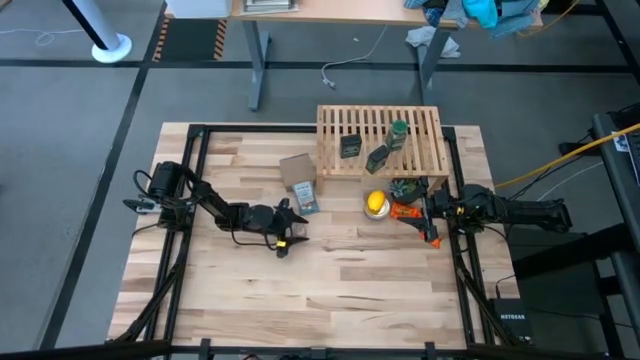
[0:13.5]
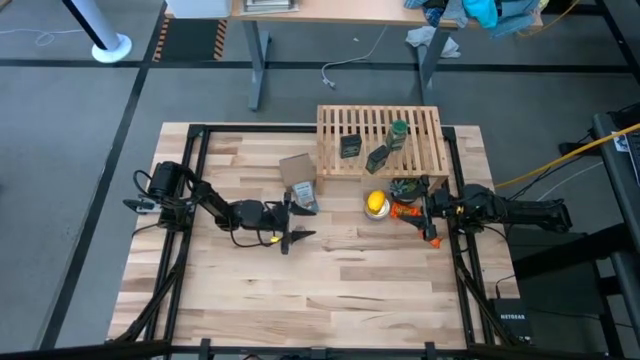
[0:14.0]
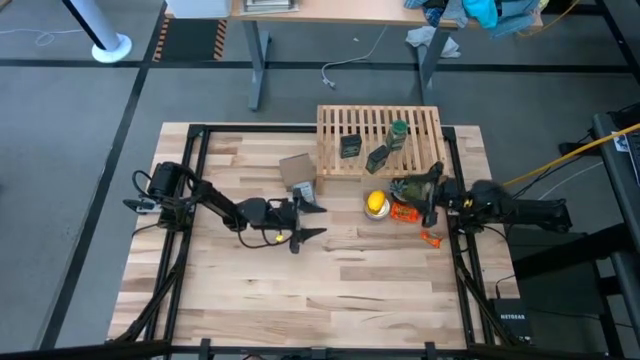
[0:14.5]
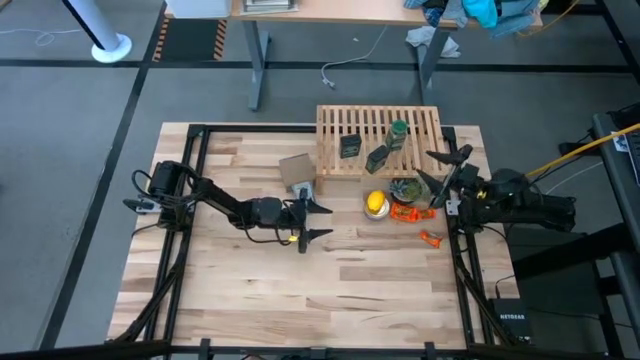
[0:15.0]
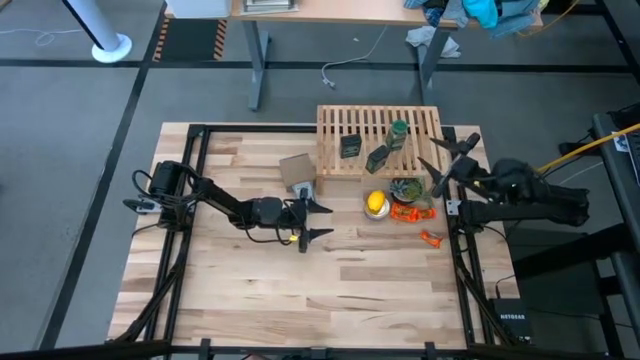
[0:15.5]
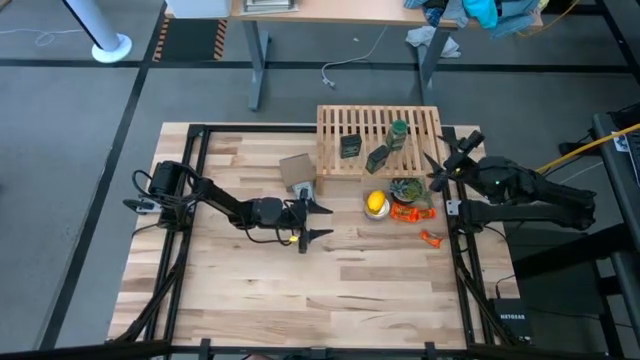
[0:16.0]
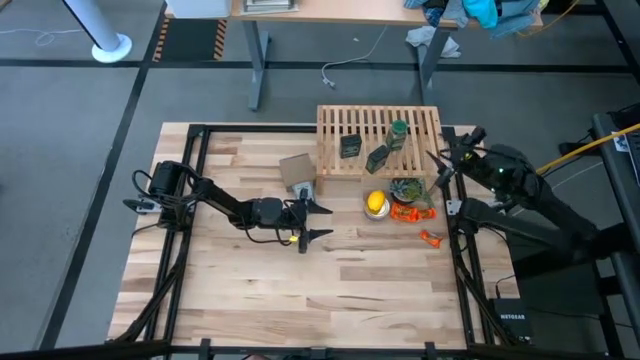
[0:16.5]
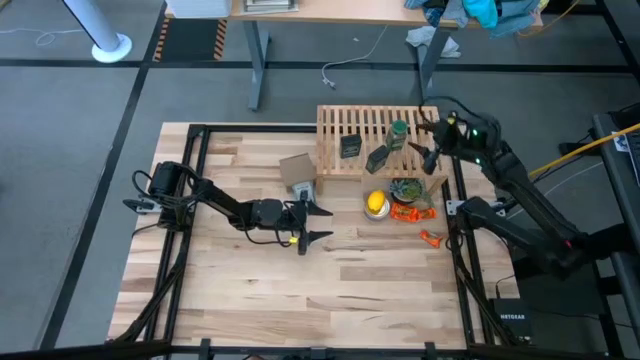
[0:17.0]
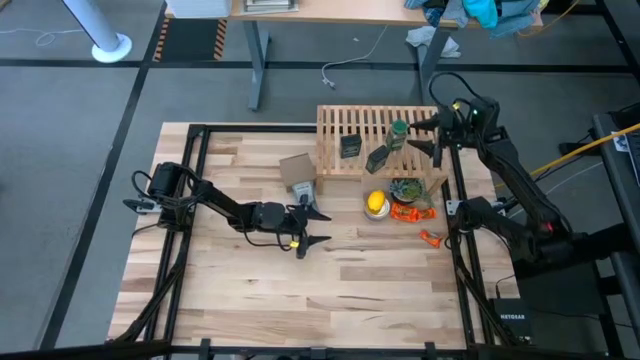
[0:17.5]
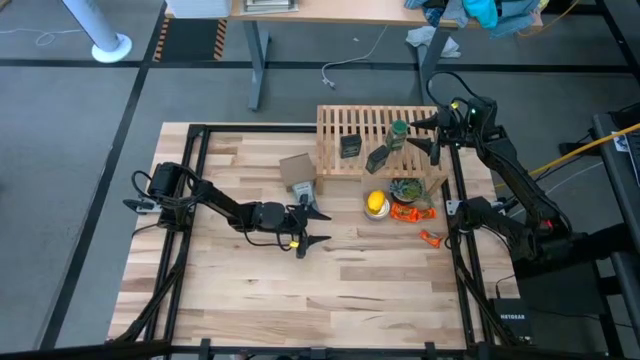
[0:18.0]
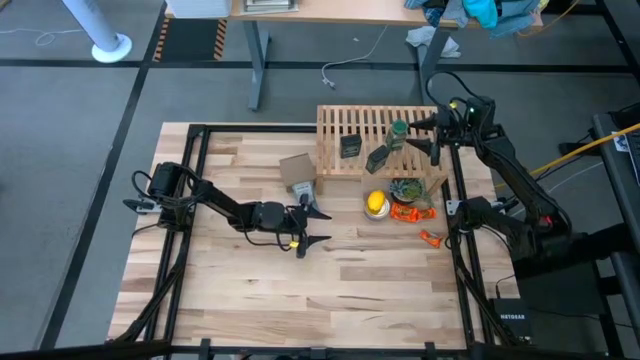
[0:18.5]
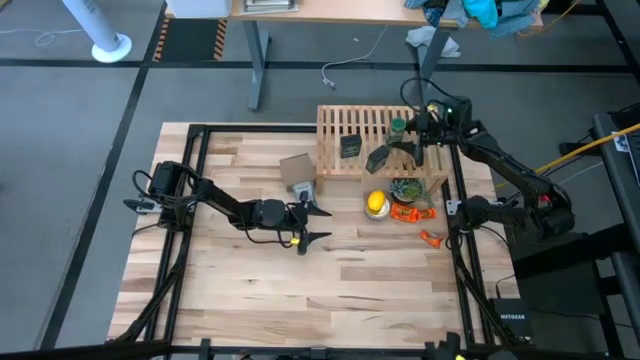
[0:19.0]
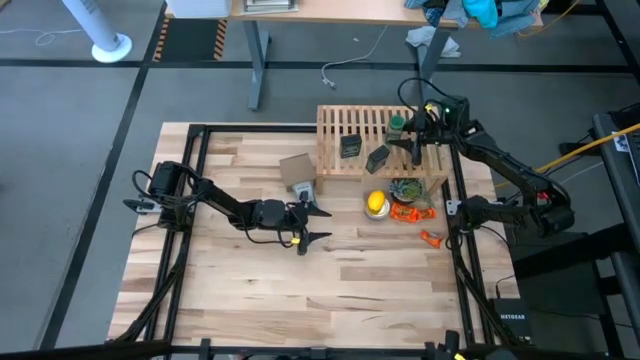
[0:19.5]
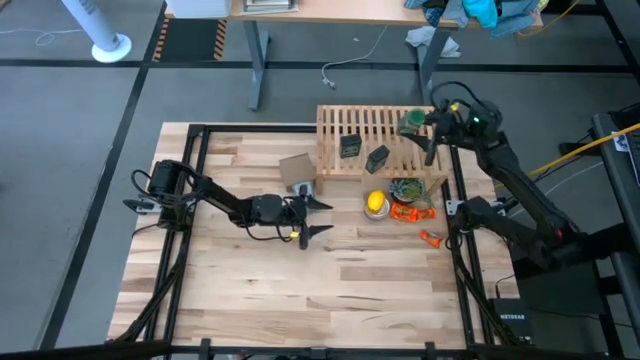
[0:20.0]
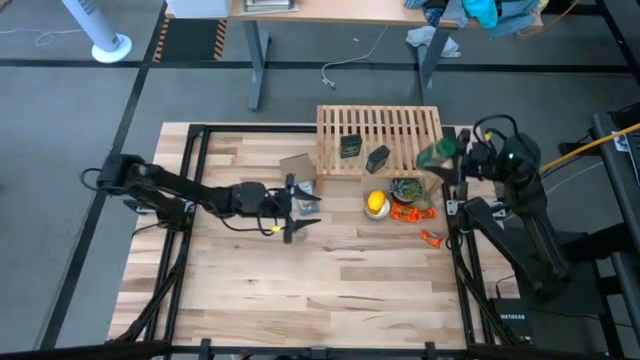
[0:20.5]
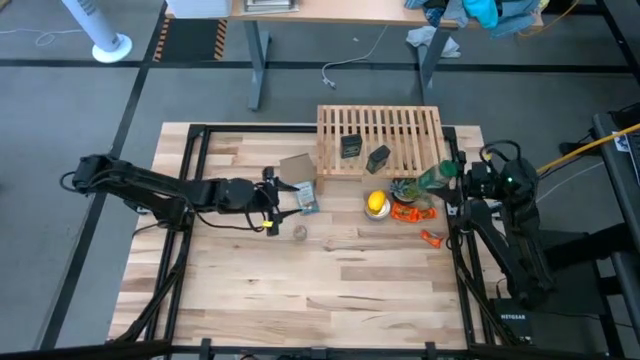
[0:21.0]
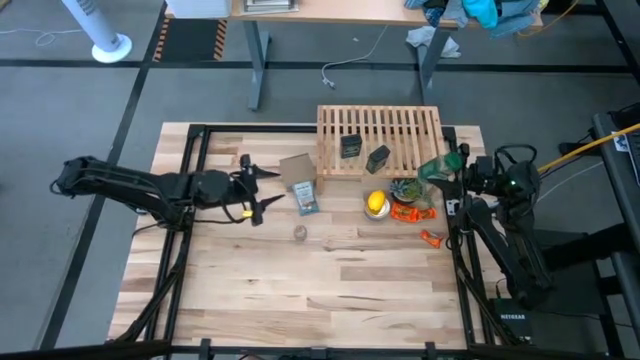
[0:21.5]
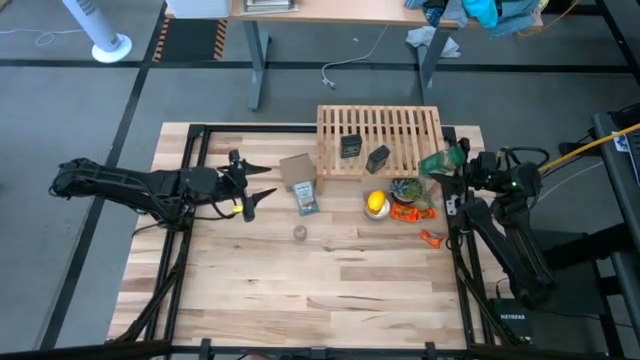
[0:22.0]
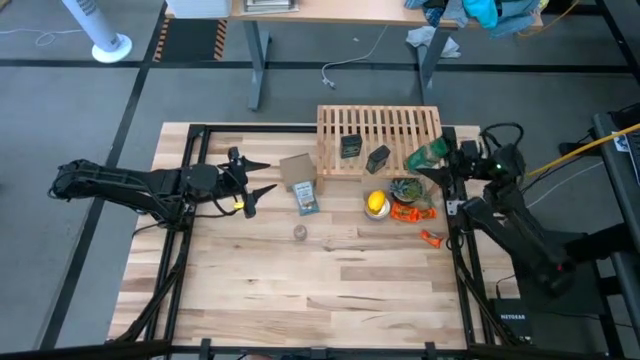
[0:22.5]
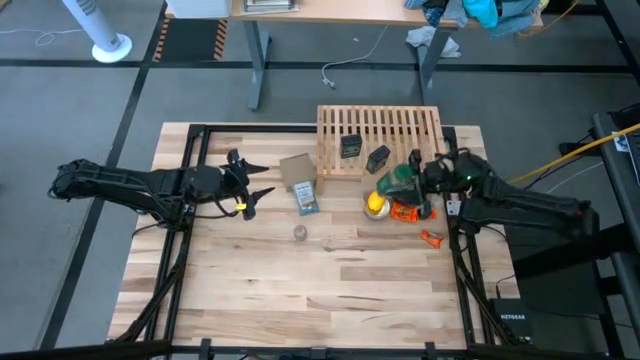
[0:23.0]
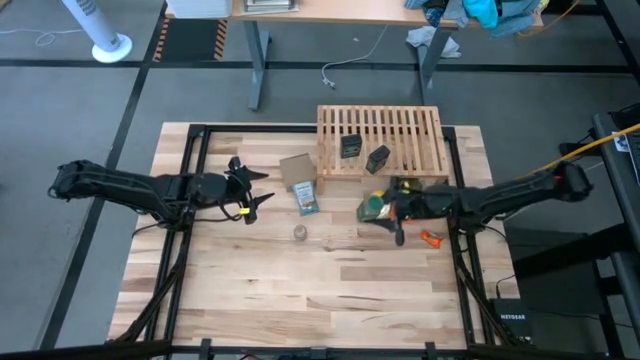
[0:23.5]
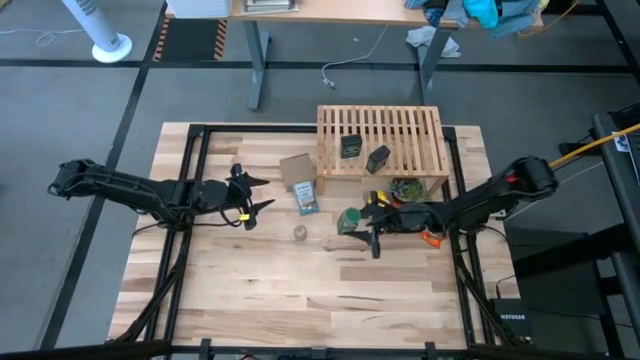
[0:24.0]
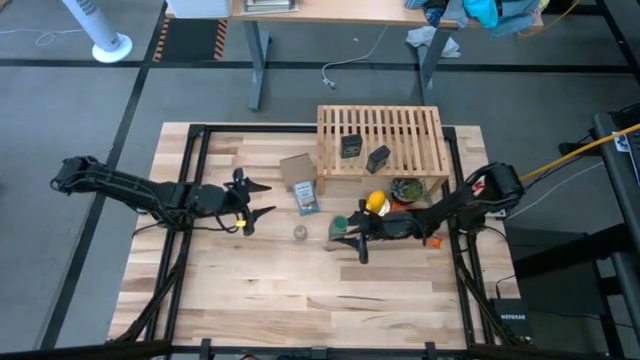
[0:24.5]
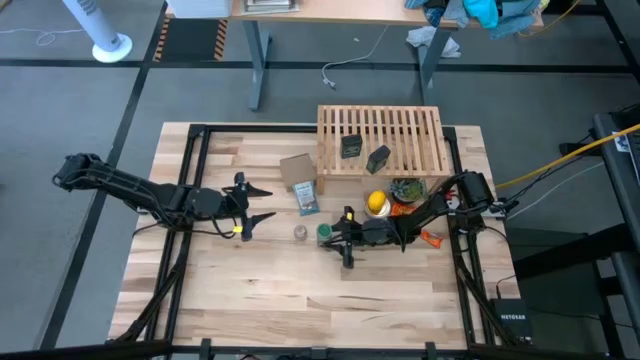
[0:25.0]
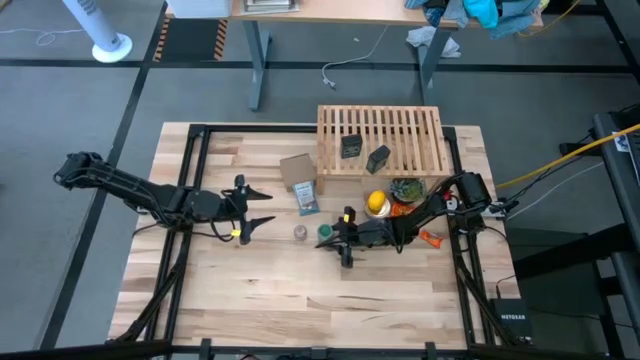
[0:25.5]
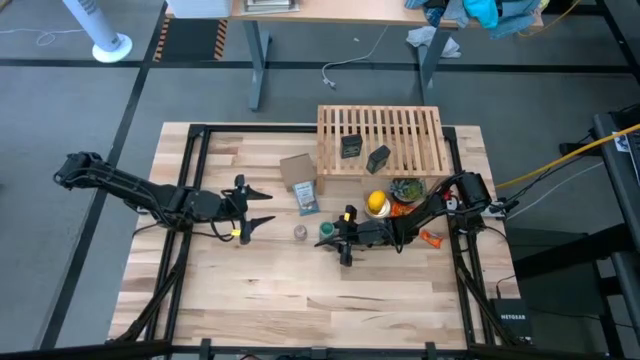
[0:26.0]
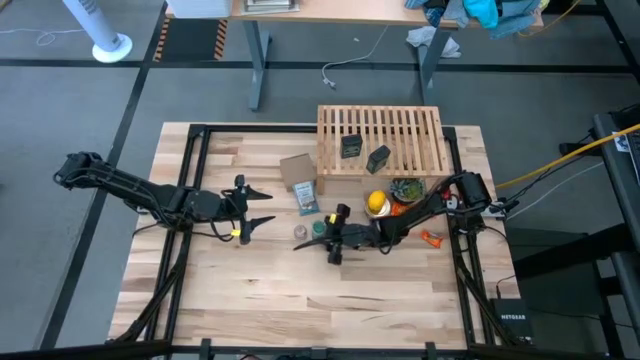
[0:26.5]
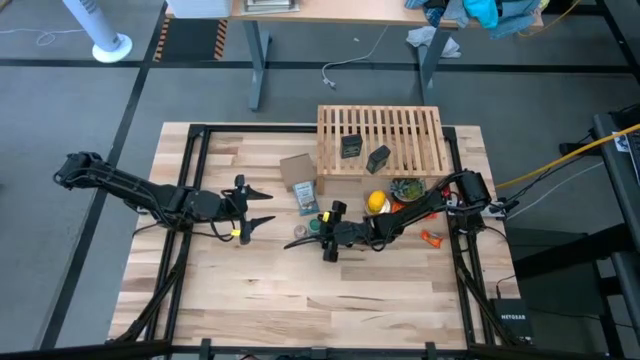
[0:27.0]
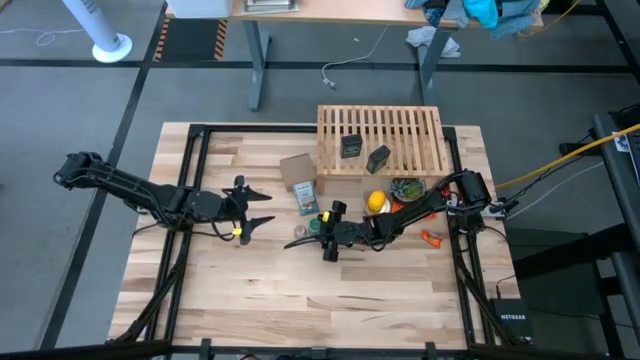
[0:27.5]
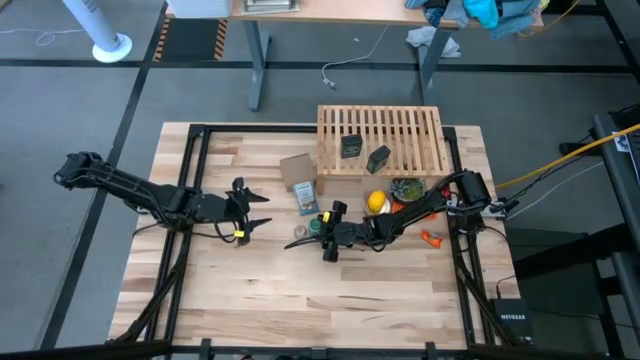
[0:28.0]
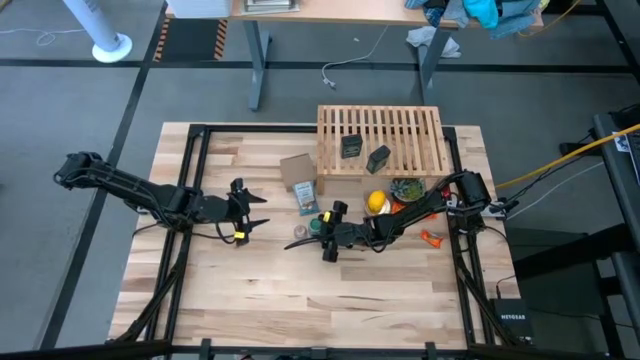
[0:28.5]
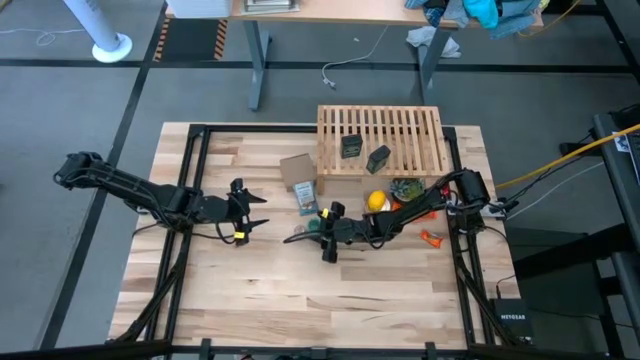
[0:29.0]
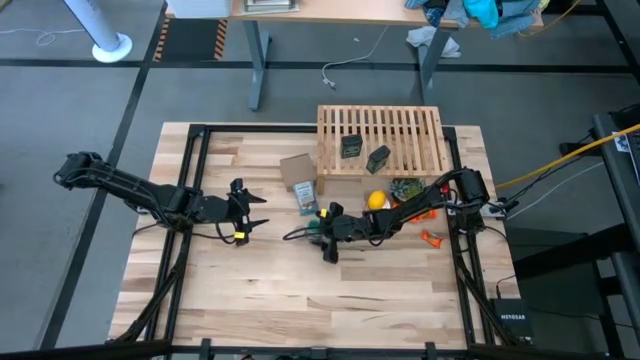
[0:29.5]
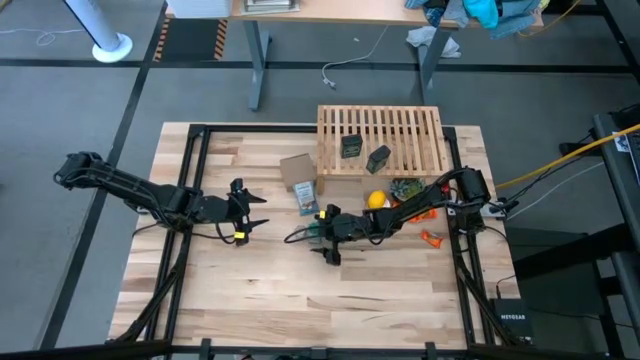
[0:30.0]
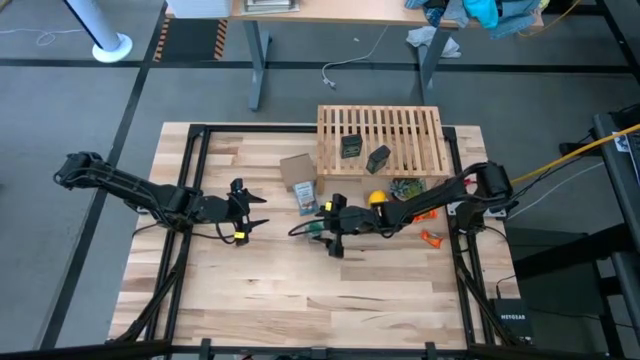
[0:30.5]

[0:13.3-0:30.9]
Task: Shelf spices
Remove the green seasoning bottle from the shelf
